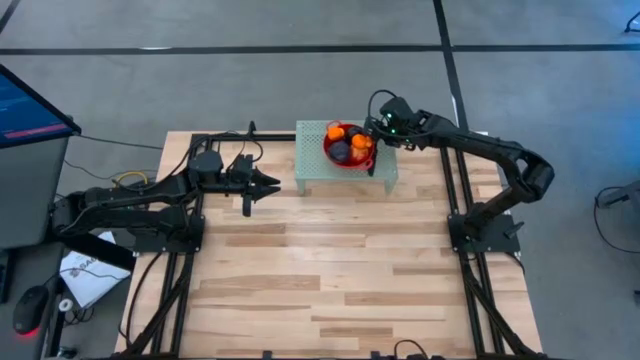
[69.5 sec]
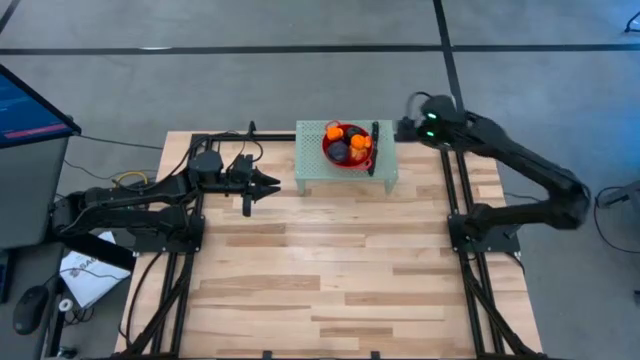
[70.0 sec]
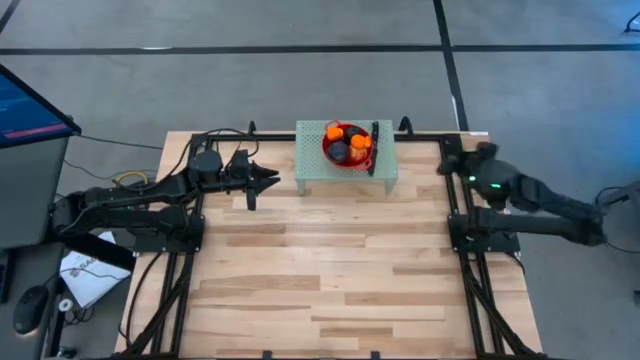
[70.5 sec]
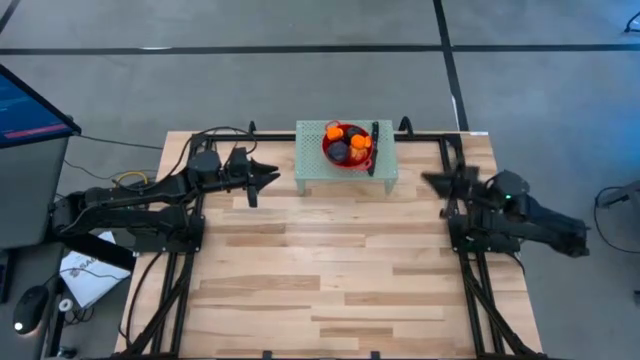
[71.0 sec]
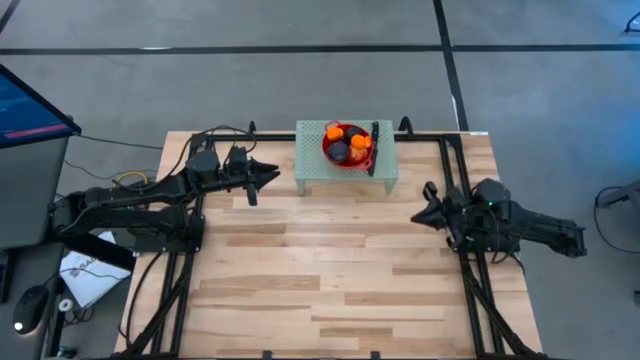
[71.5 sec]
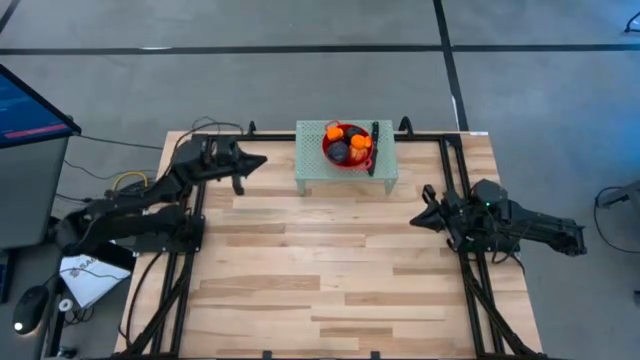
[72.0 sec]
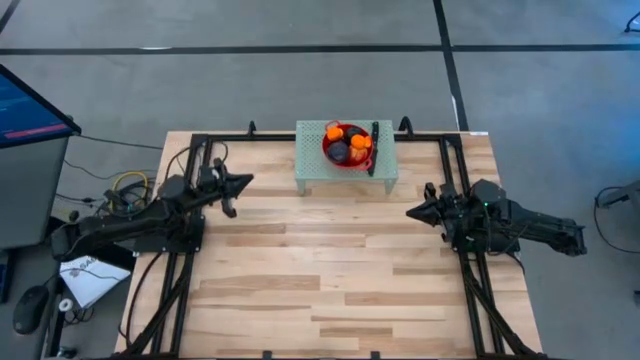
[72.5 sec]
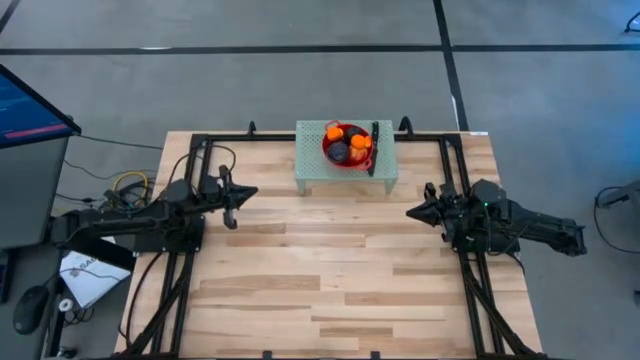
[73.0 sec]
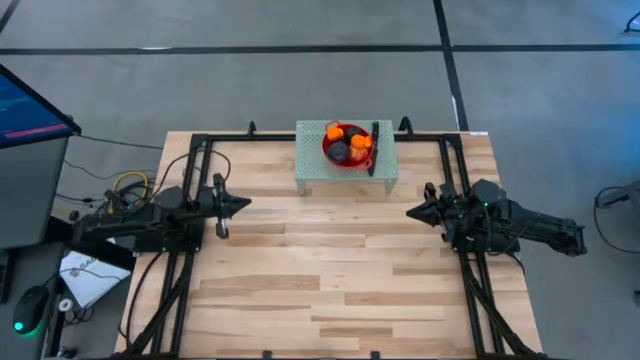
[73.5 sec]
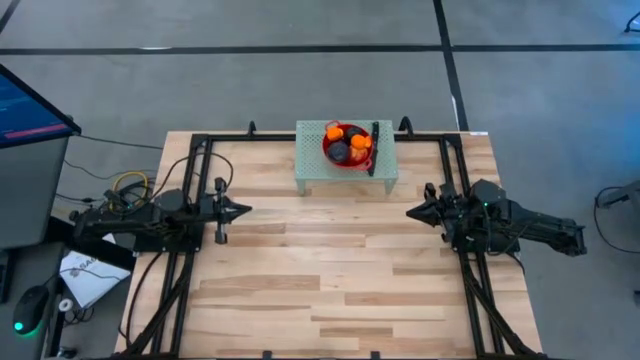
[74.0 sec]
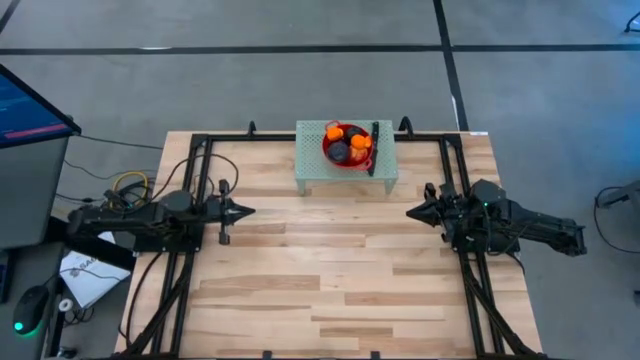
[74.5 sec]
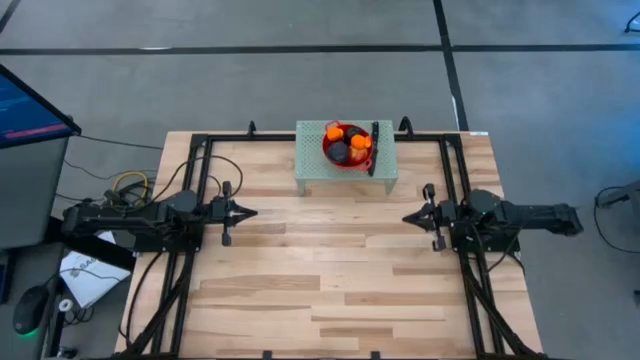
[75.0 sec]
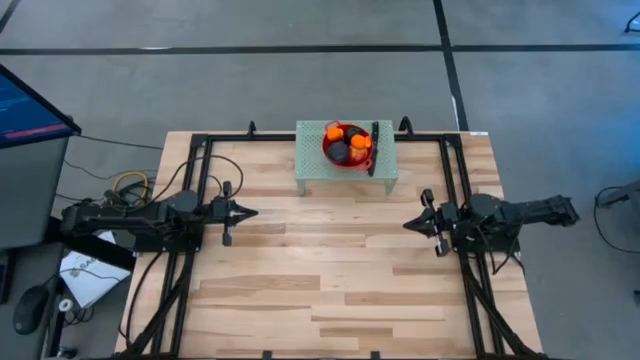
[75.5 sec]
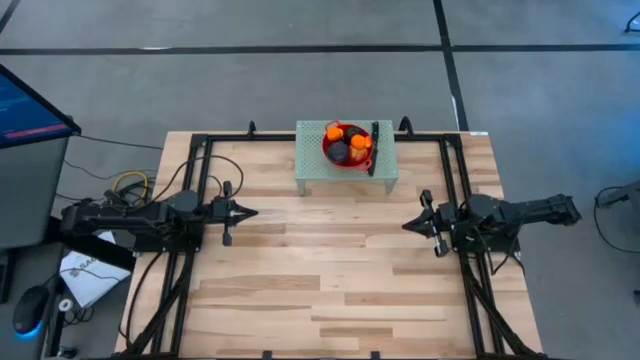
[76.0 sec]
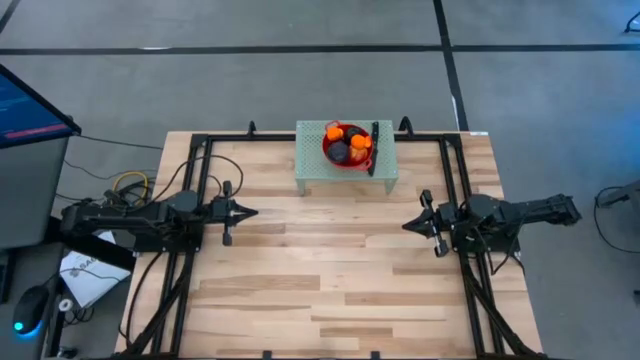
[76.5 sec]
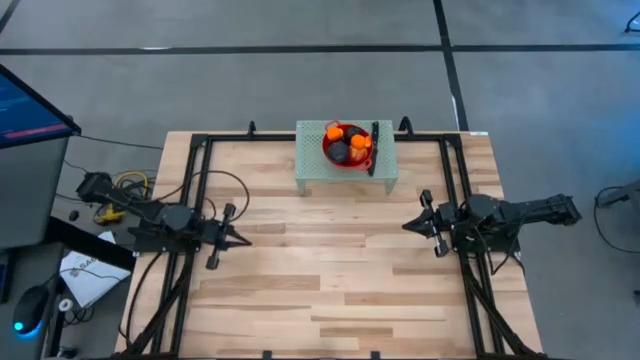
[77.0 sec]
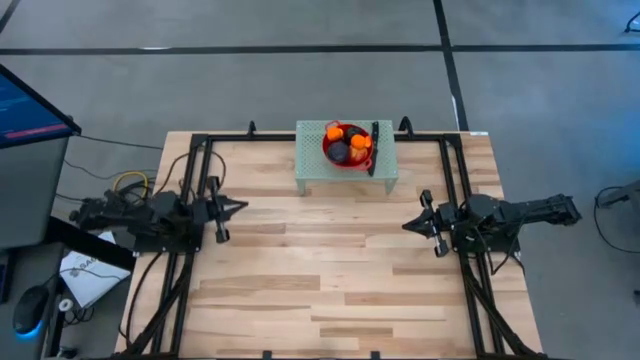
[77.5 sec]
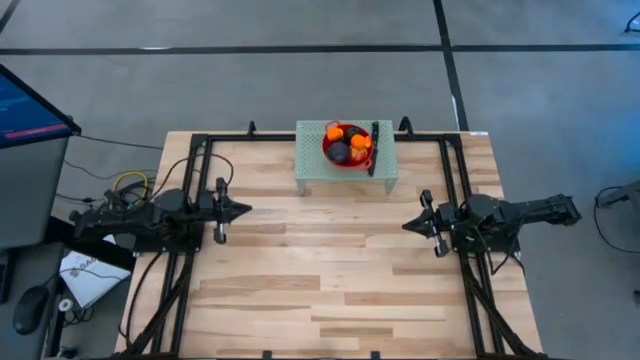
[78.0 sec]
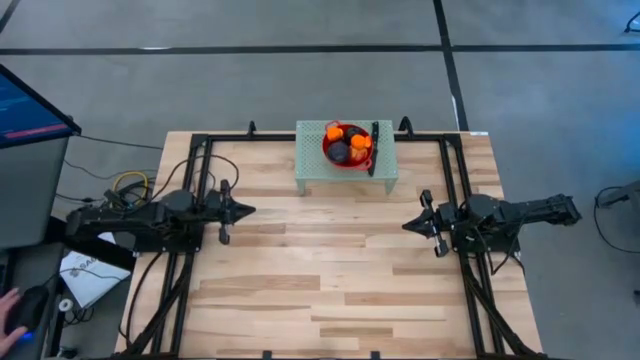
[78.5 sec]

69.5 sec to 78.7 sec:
Task: Pick & Place Fruit
Return to Home Position

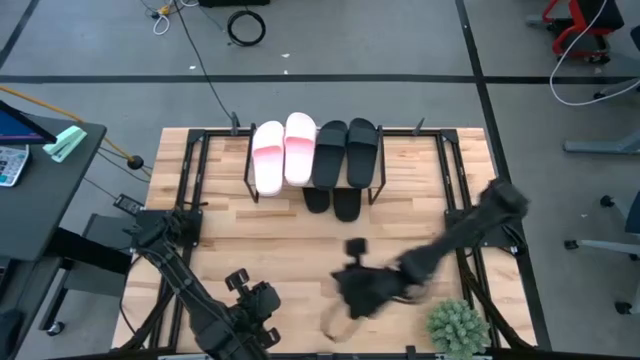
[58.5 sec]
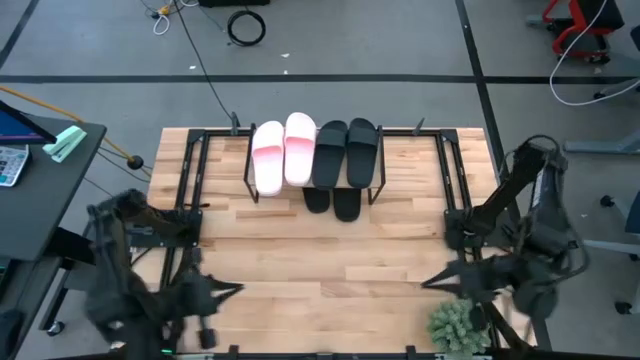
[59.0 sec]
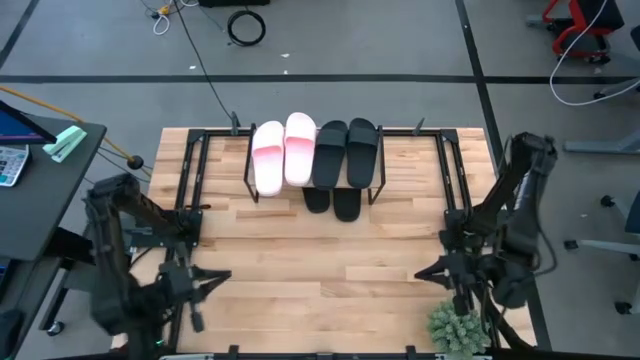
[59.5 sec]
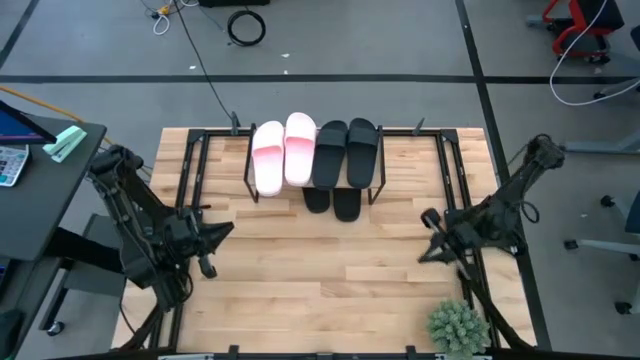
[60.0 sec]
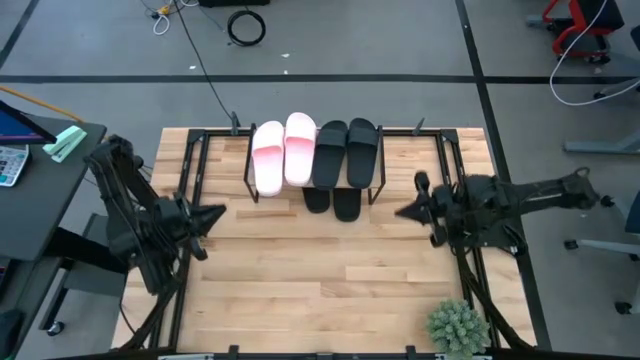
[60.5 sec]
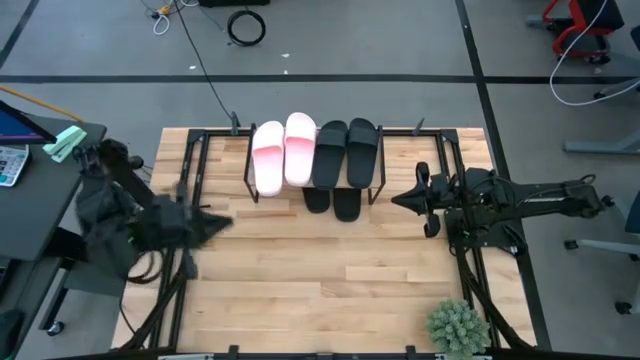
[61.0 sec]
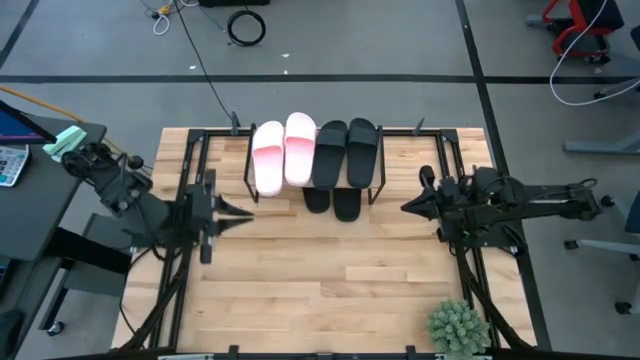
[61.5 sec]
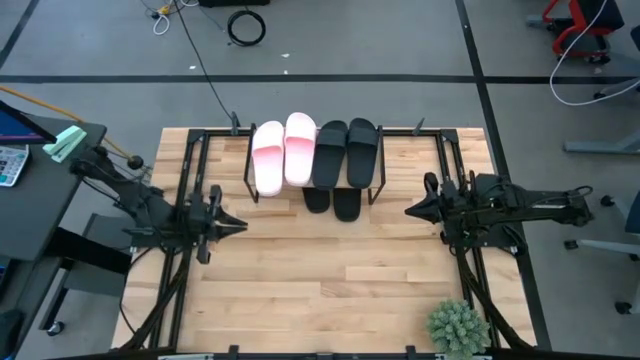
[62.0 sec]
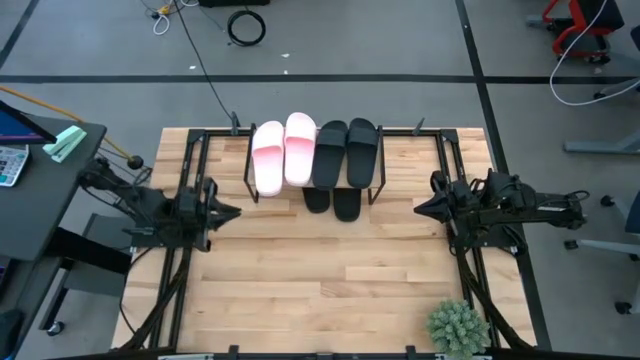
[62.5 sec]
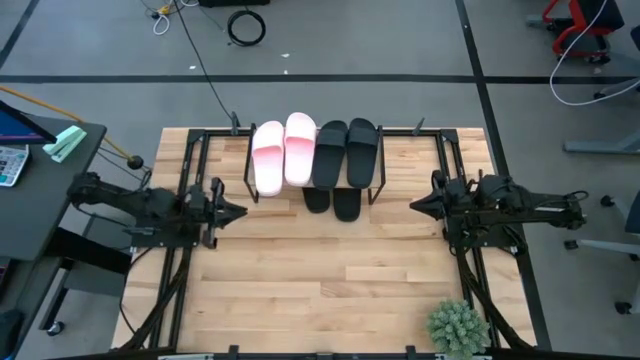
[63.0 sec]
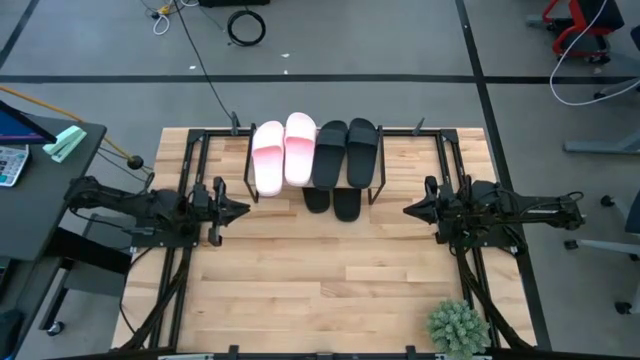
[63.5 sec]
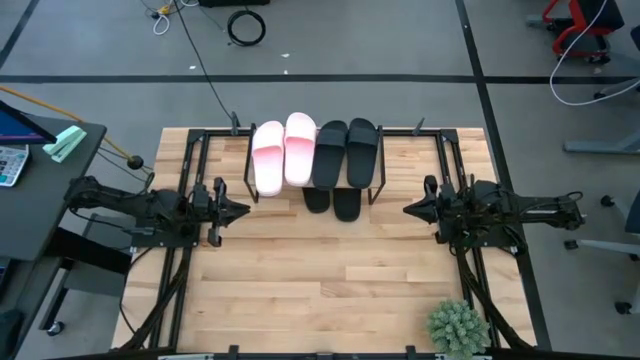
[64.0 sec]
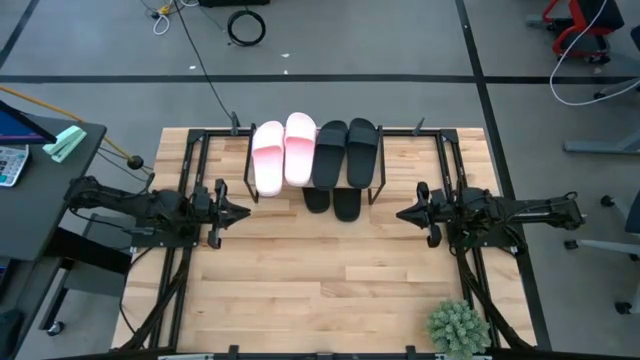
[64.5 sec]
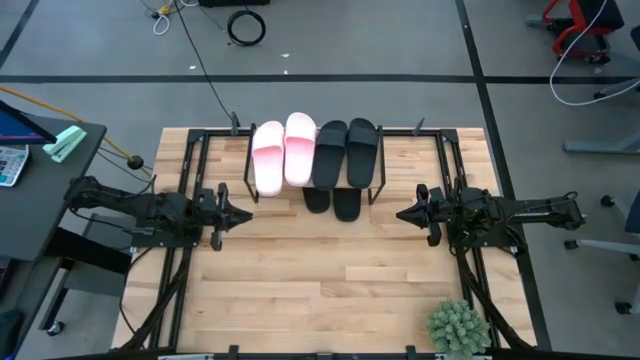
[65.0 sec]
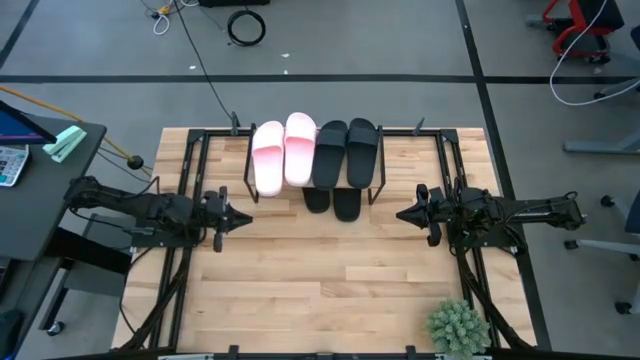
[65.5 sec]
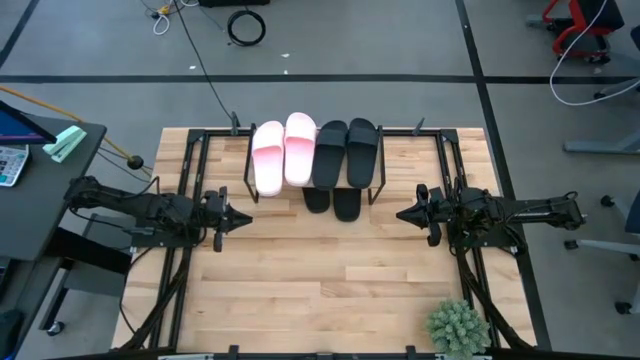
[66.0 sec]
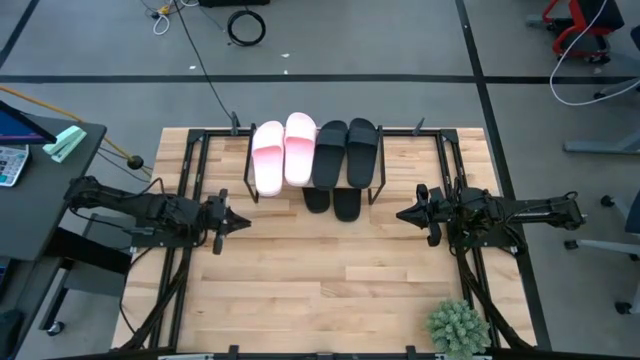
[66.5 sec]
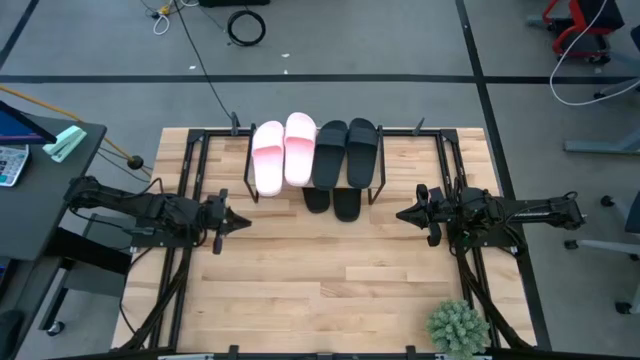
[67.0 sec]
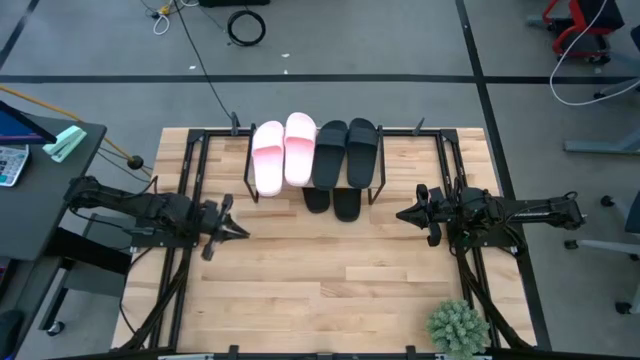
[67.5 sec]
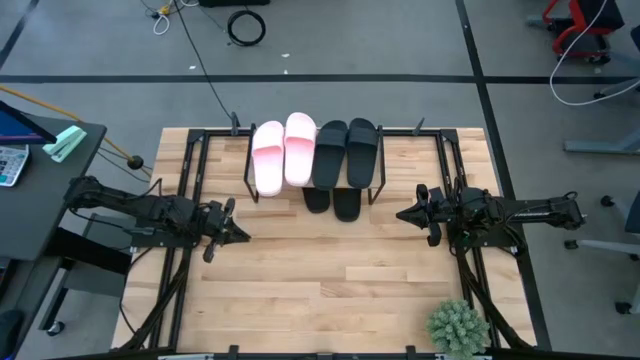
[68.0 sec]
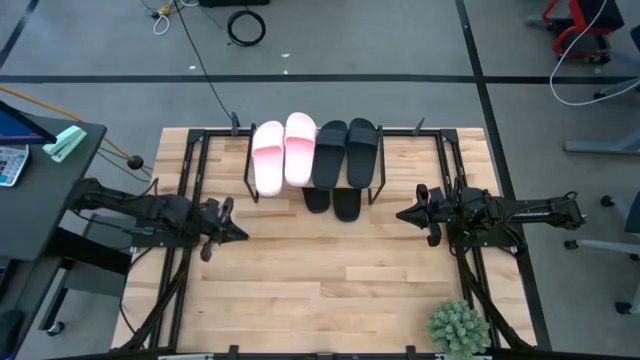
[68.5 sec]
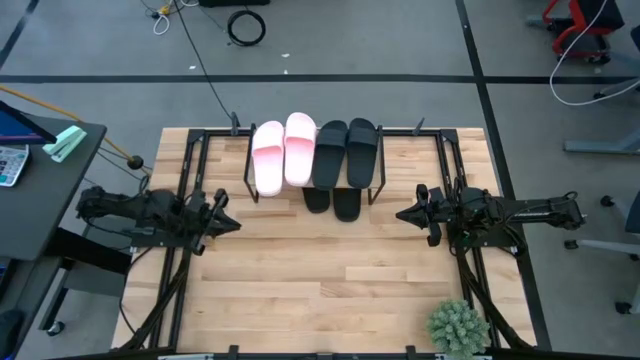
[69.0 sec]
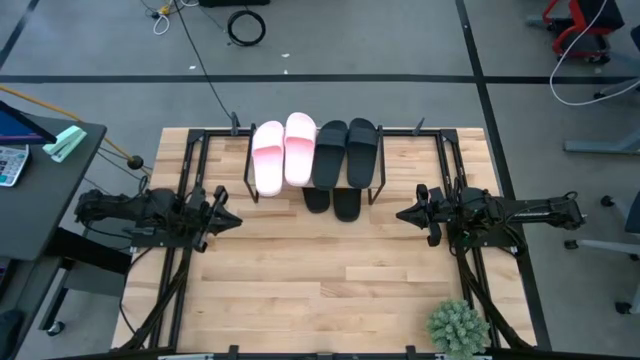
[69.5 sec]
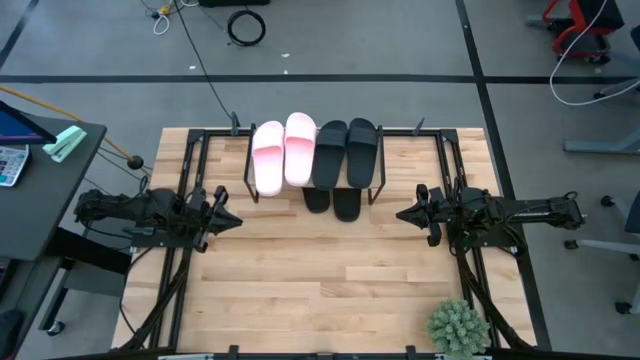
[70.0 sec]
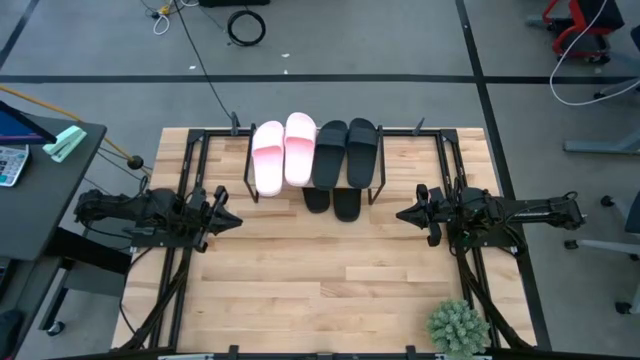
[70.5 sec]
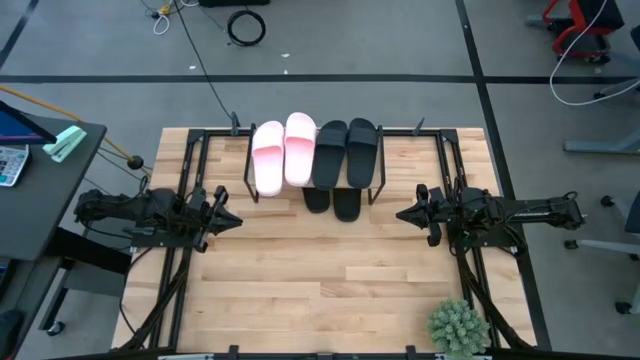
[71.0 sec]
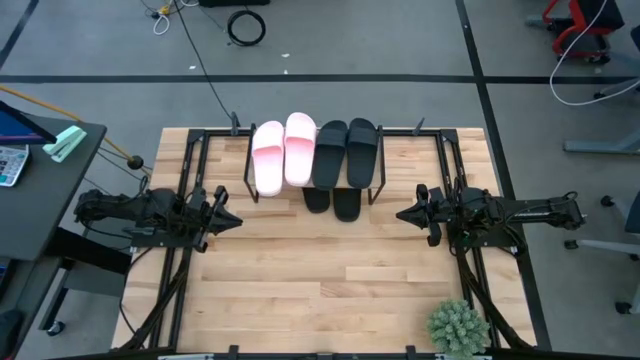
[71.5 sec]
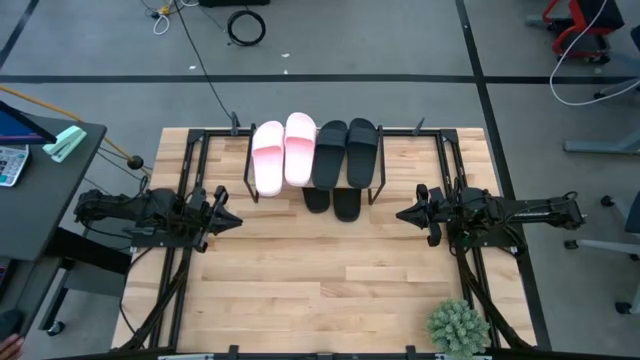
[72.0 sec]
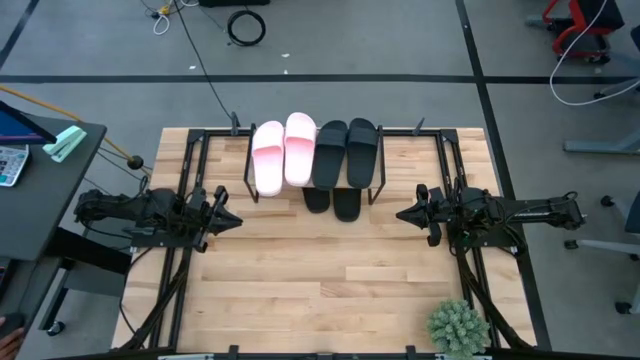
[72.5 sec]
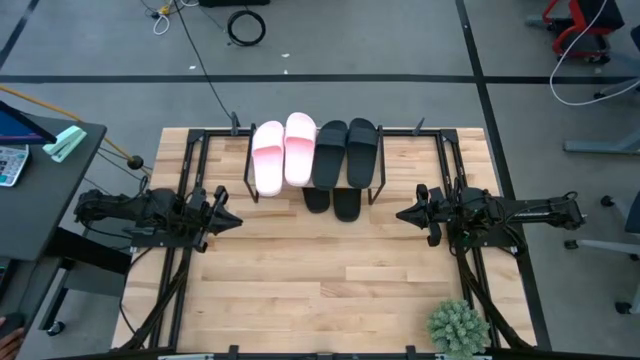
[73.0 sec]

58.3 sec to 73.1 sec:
Task: Pick and place slides into the shelf
Return to Home Position
